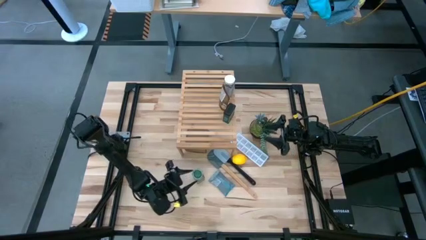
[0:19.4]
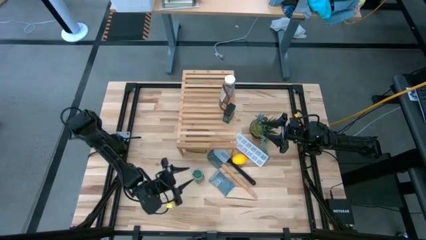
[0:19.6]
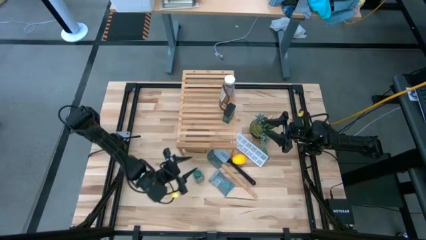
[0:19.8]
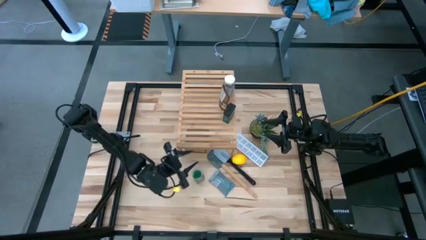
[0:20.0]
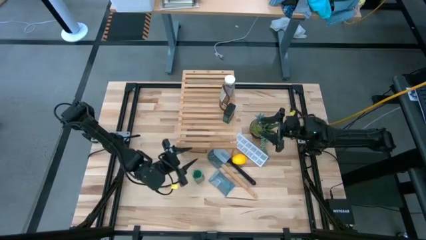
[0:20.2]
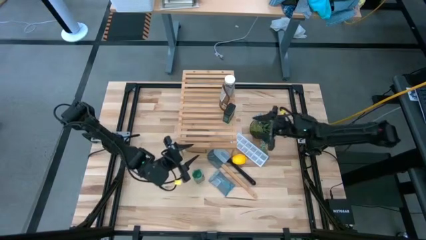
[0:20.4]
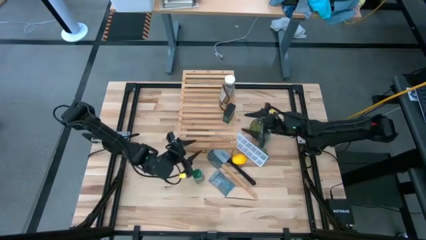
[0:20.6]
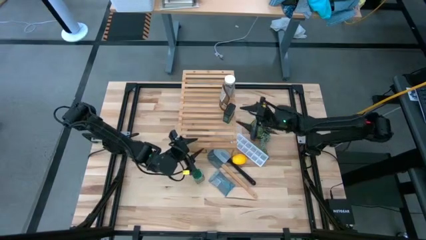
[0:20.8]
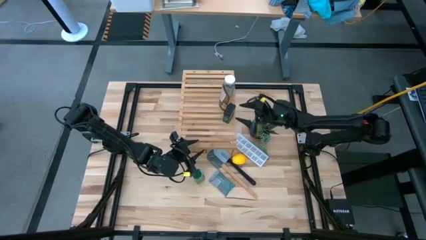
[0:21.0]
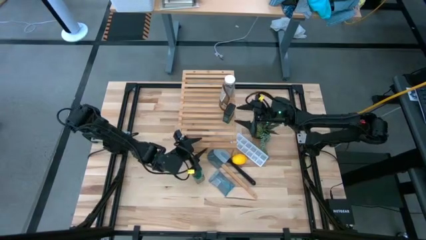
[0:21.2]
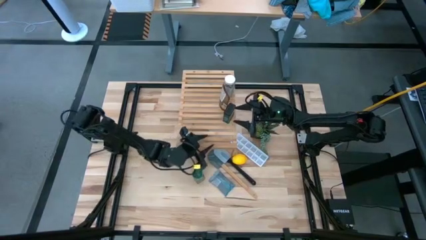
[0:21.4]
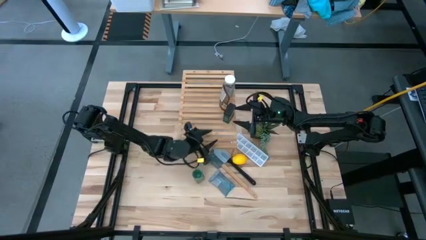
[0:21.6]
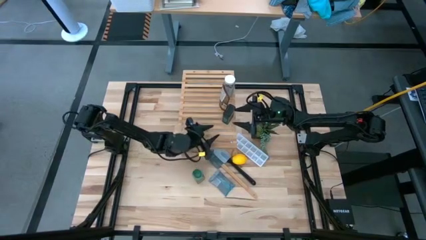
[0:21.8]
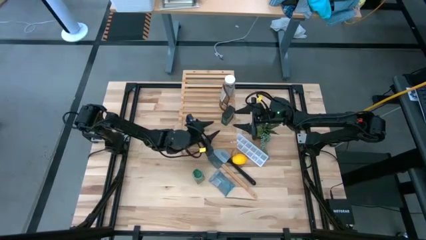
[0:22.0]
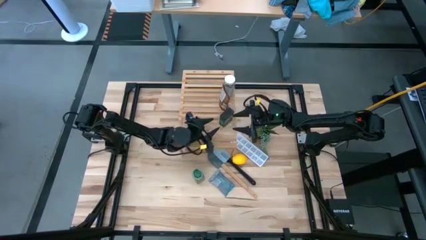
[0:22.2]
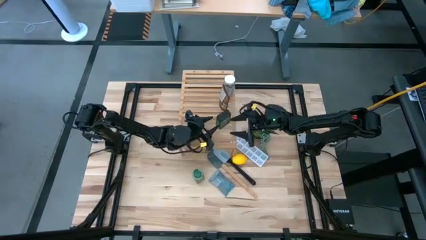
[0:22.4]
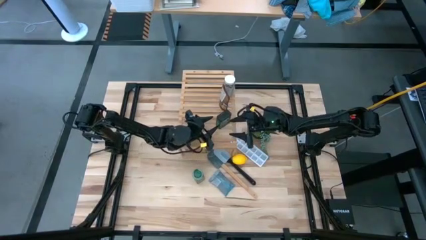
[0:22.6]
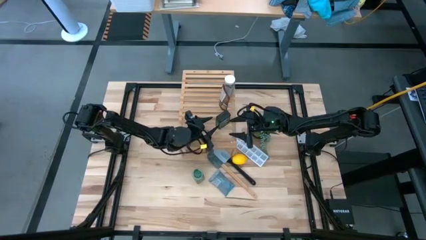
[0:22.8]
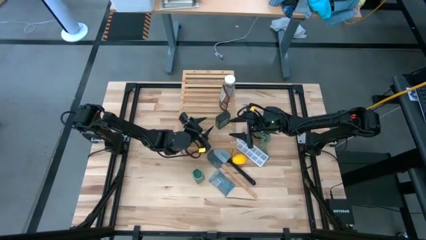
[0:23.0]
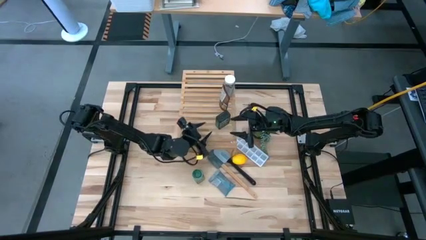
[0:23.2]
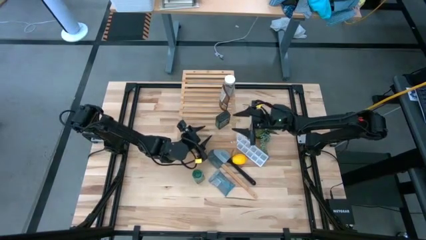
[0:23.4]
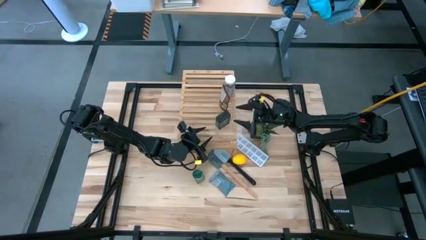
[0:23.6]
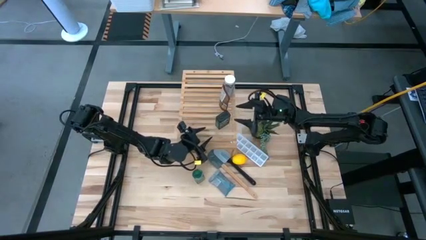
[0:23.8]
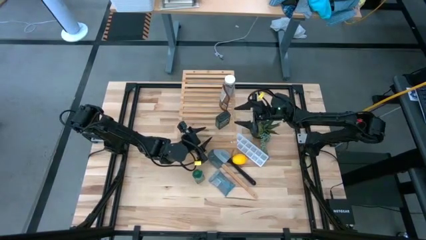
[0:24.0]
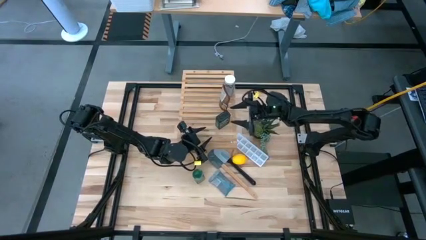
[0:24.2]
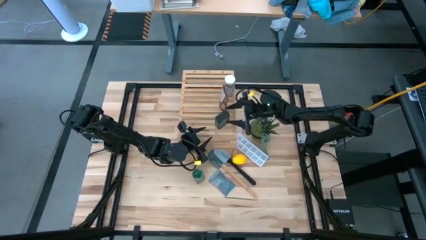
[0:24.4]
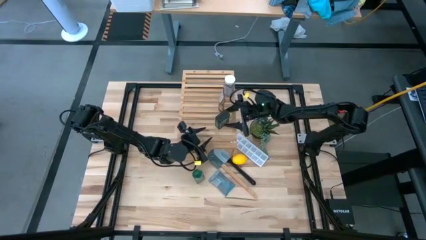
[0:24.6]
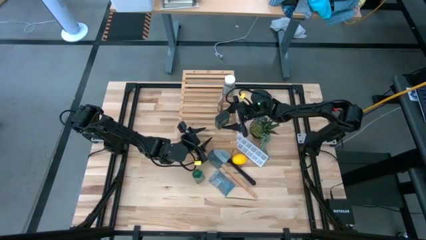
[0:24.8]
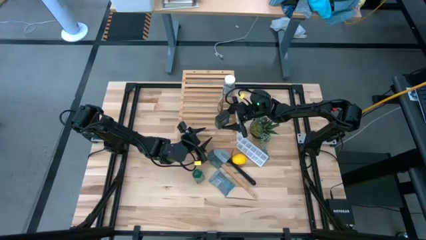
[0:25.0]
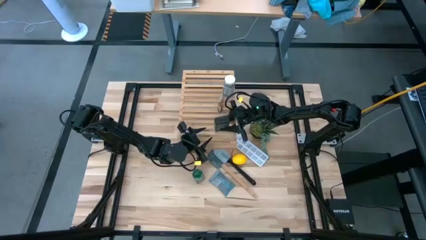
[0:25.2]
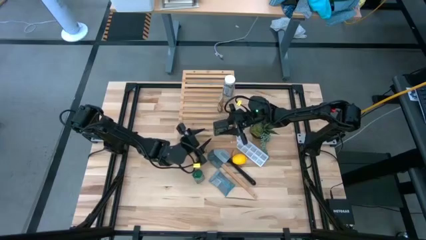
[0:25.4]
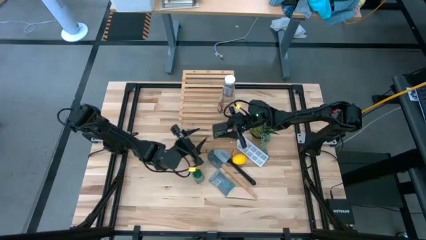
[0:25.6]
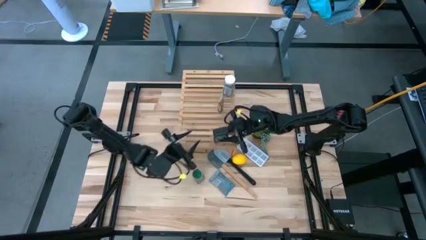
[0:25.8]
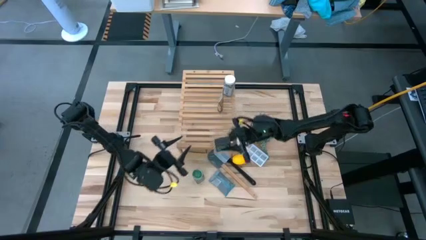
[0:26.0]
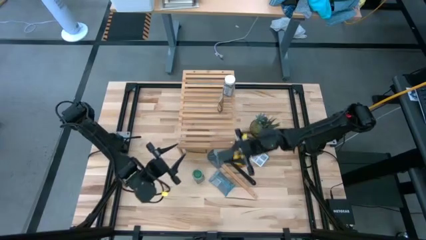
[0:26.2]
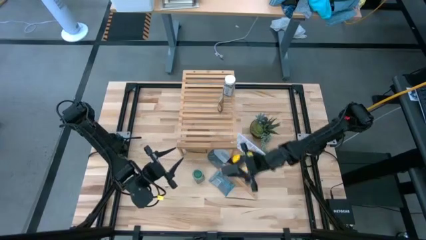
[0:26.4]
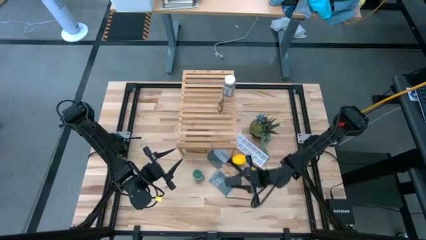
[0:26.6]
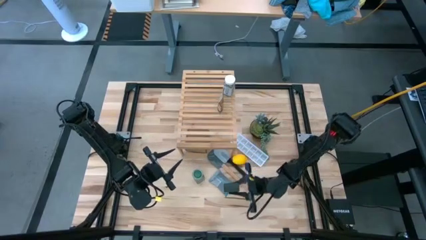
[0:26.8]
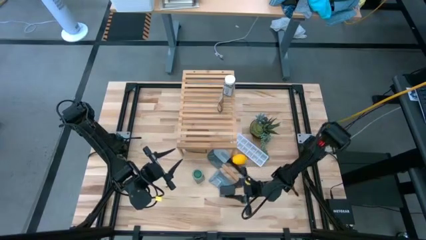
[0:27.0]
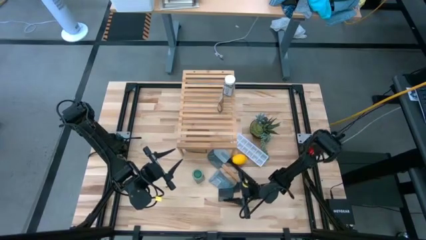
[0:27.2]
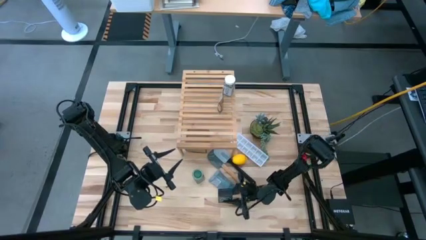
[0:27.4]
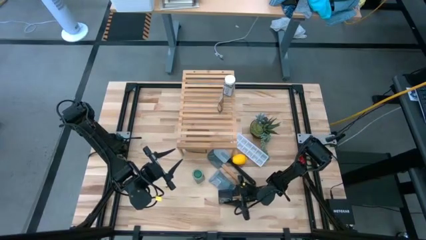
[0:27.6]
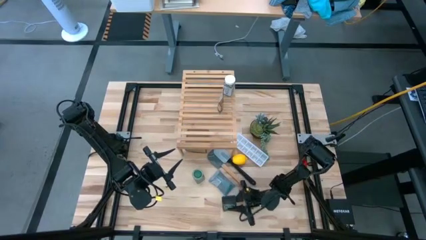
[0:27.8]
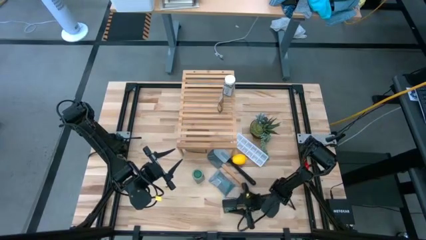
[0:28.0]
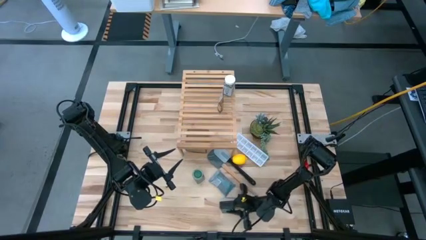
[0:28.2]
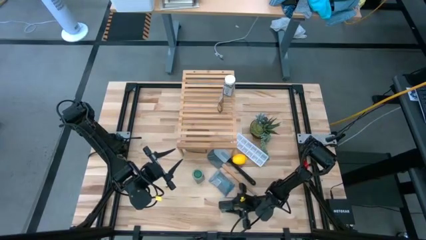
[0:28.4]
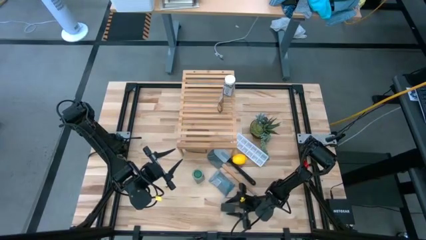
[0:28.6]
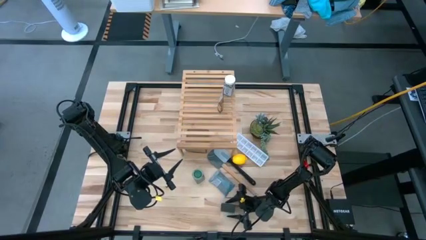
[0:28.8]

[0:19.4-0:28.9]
Task: Shelf spices
Remove the dark green seasoning can from the shelf

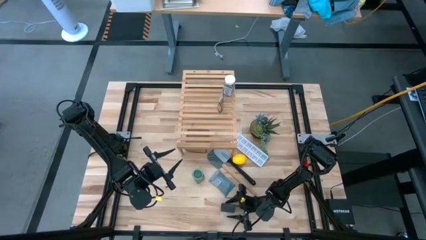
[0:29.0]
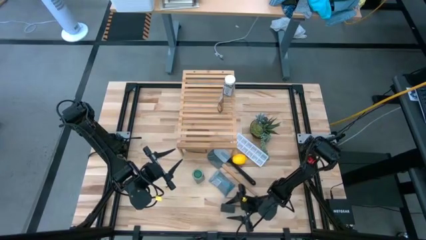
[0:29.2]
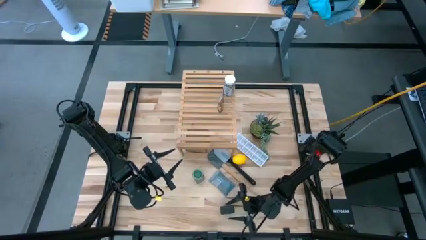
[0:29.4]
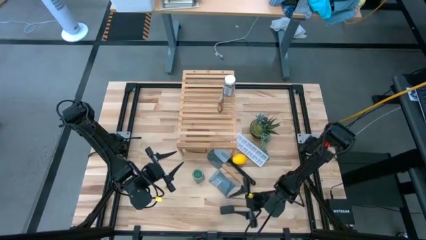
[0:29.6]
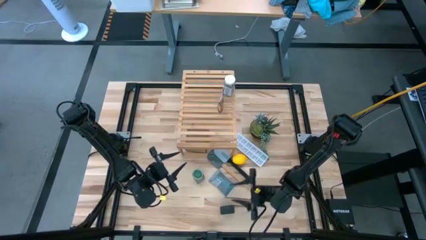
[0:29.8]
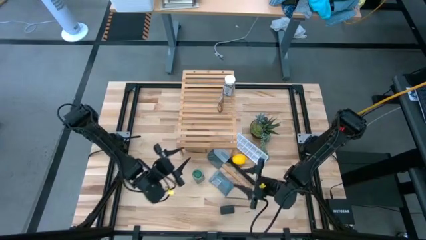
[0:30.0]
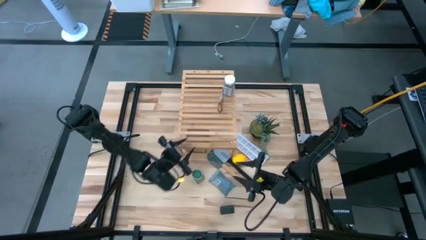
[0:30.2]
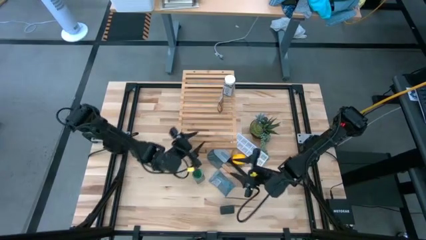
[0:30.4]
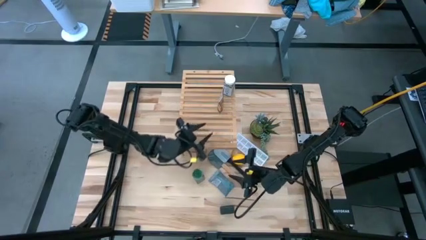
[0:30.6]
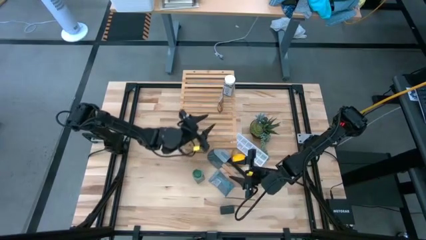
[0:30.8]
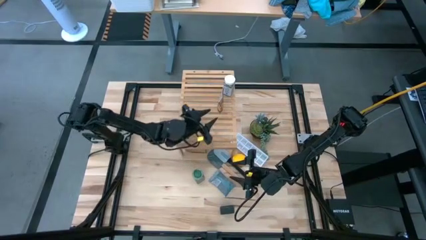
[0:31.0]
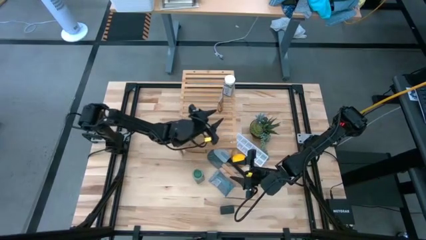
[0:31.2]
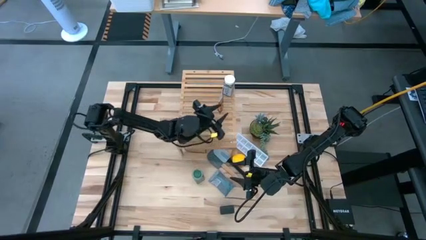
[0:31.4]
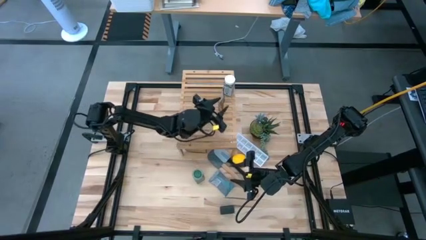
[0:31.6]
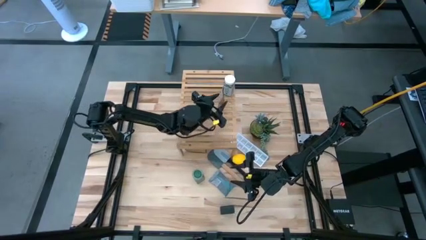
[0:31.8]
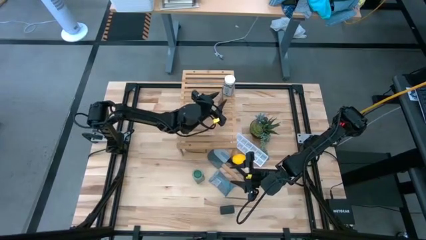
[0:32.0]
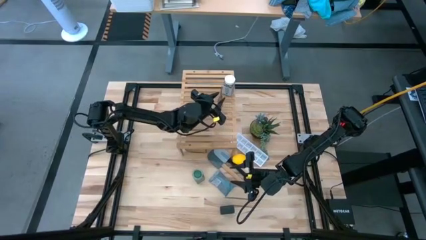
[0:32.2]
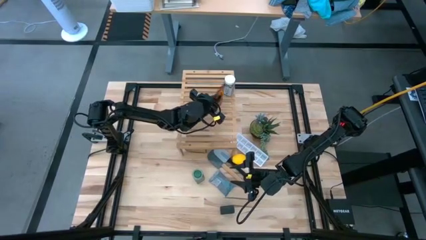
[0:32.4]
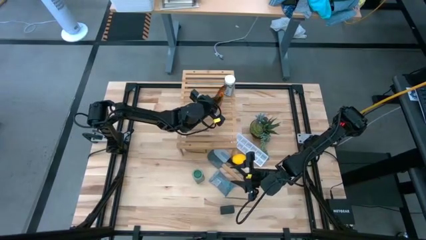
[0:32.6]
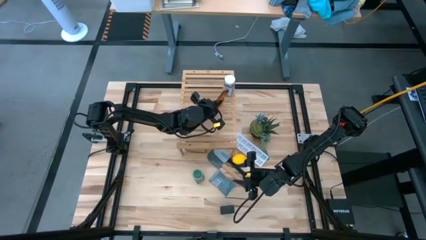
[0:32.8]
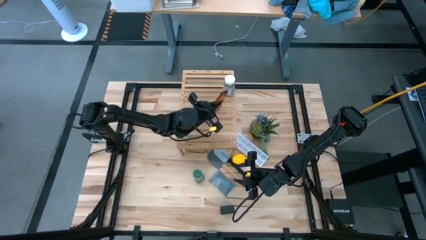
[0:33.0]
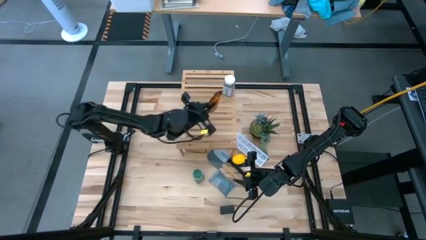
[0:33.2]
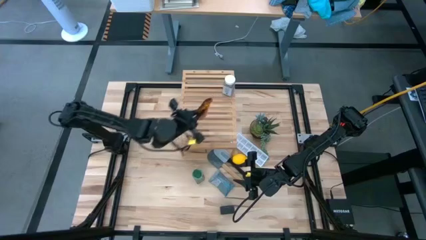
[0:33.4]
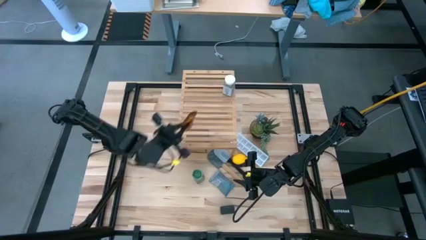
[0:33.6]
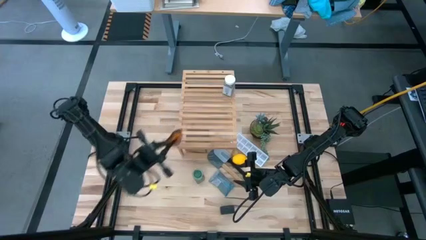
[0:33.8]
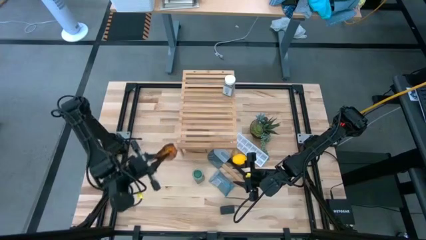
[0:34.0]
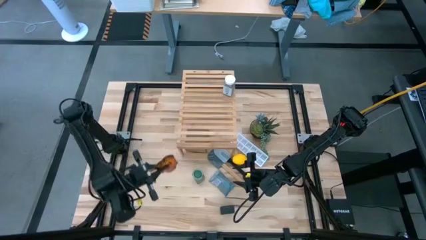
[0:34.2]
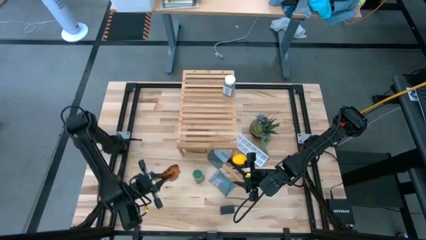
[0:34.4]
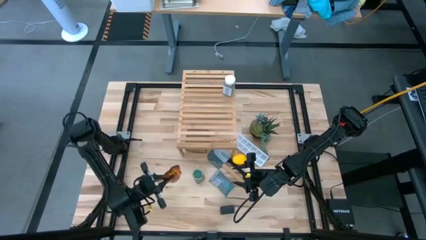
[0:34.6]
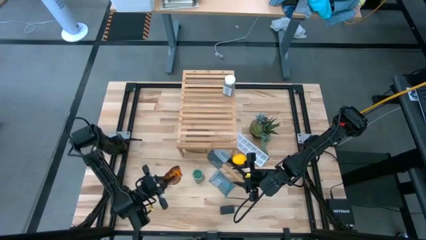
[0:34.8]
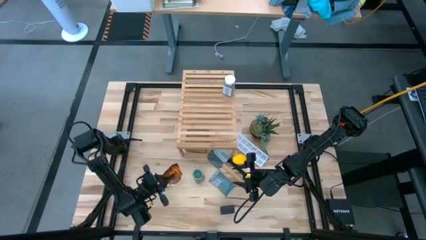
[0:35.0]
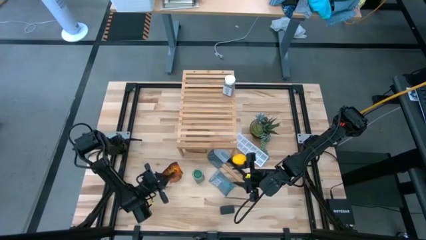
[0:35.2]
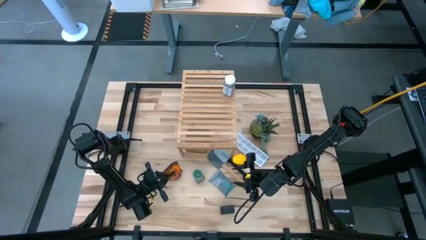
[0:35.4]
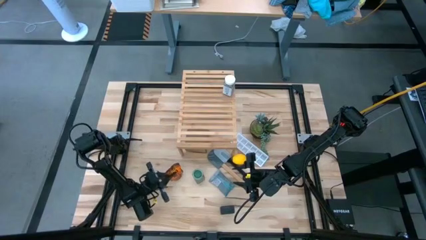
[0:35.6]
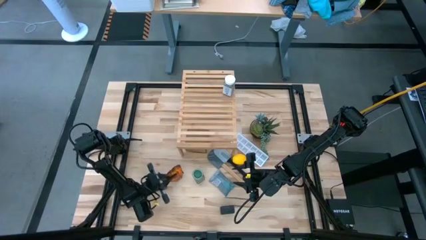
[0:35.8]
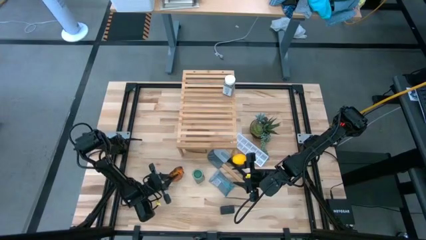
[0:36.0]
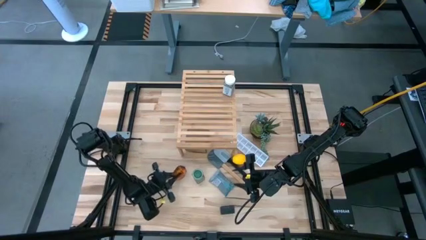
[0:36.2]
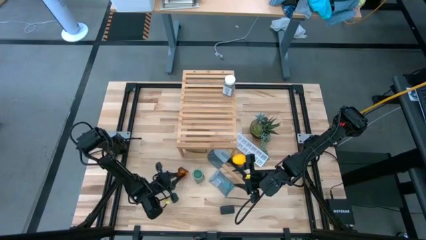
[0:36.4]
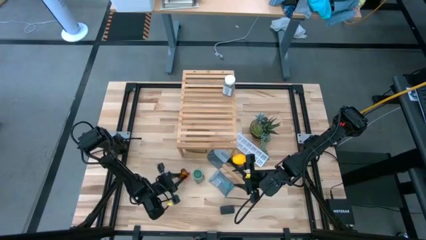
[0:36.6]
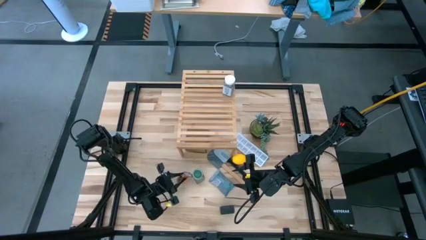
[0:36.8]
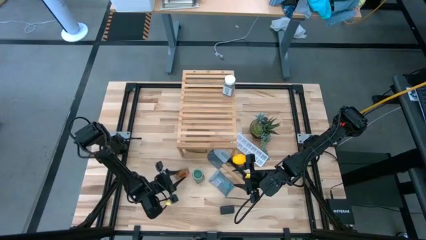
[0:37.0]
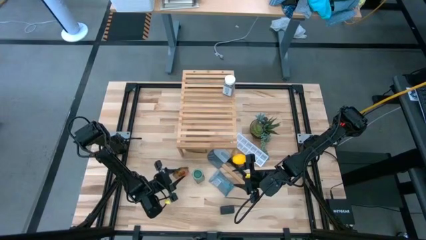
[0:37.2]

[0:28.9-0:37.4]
Remove the brown and orange seasoning bag from the shelf
